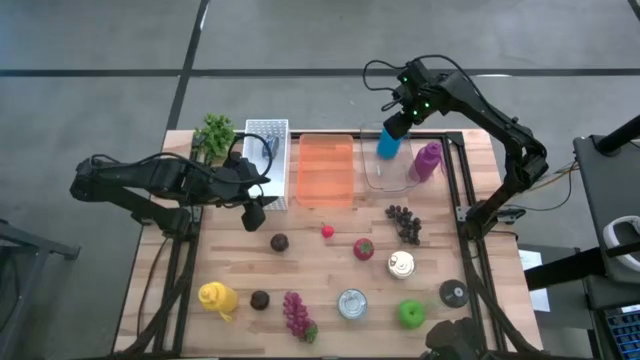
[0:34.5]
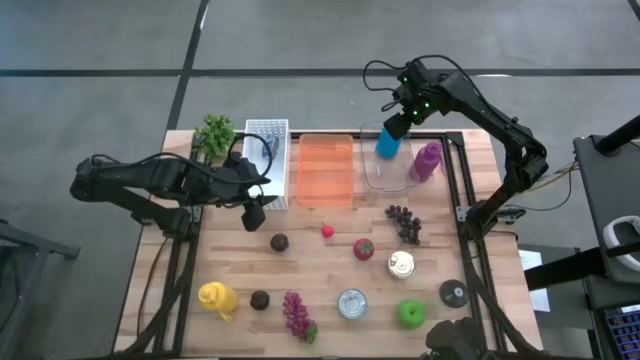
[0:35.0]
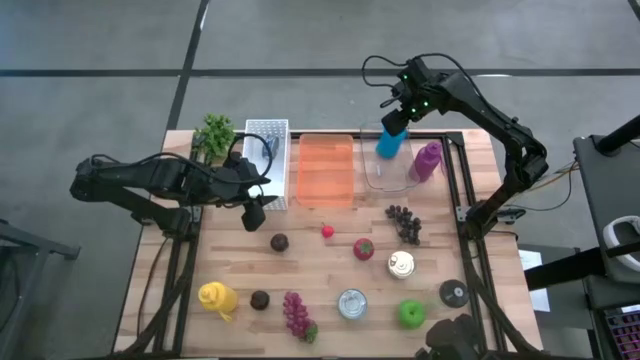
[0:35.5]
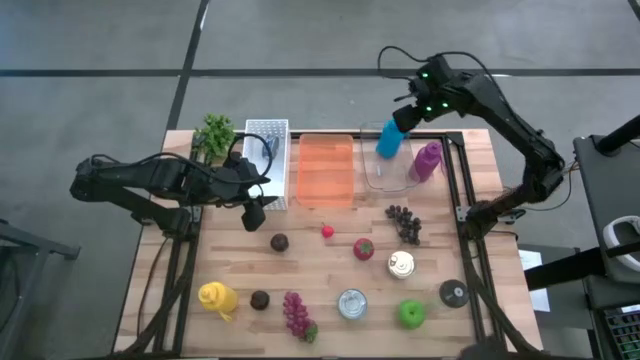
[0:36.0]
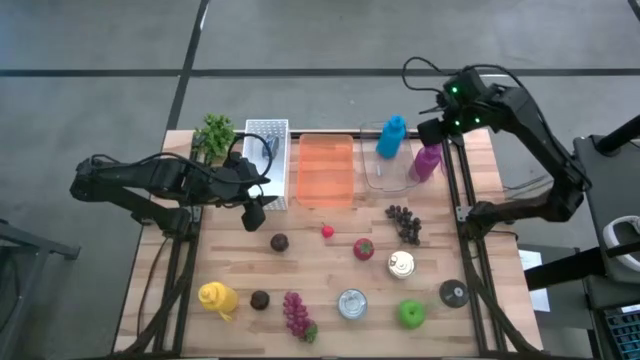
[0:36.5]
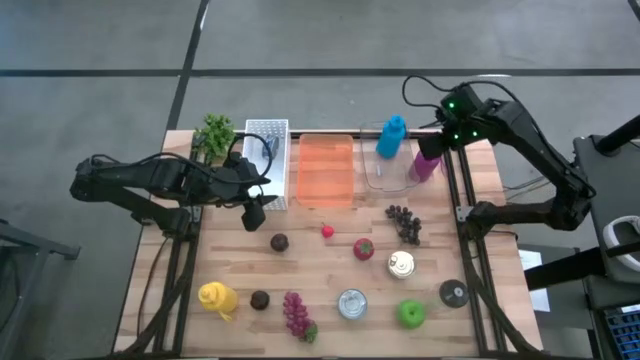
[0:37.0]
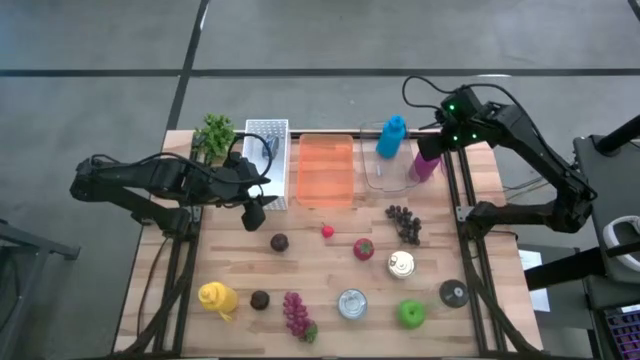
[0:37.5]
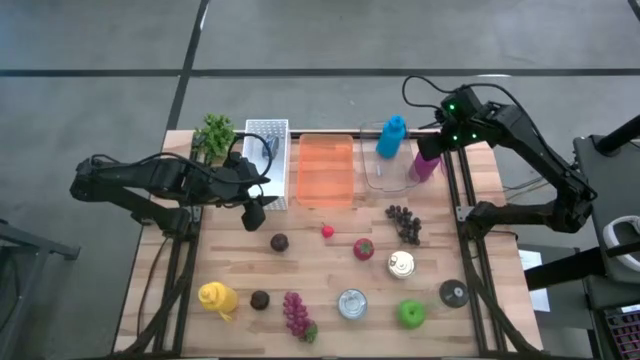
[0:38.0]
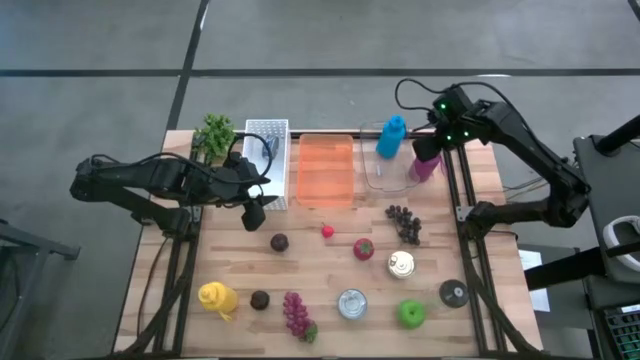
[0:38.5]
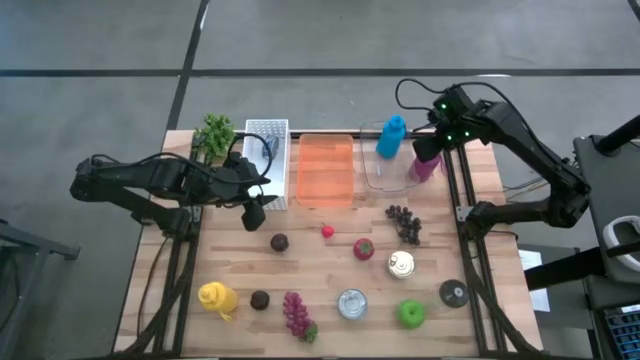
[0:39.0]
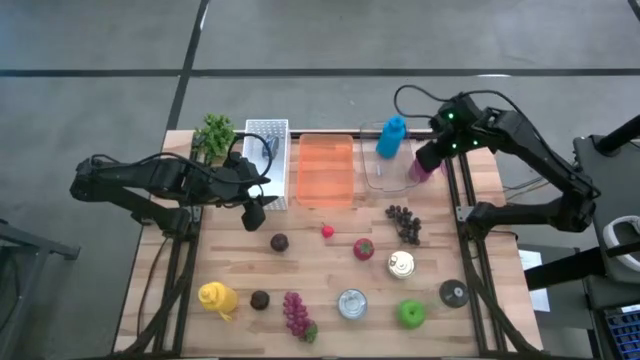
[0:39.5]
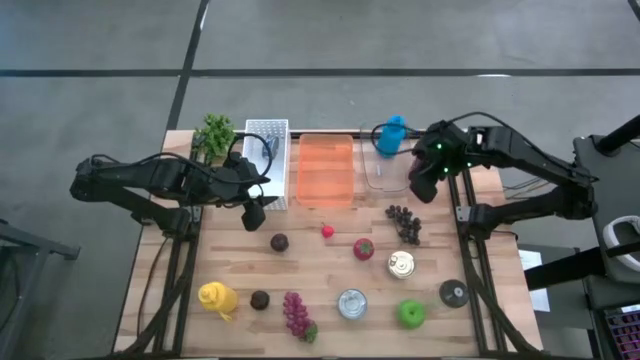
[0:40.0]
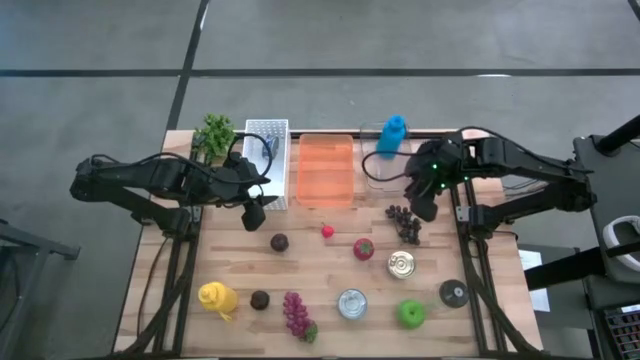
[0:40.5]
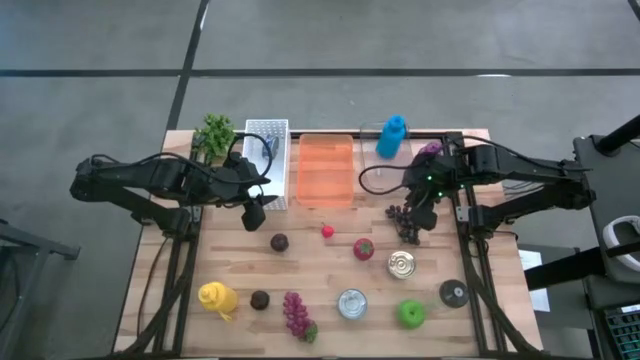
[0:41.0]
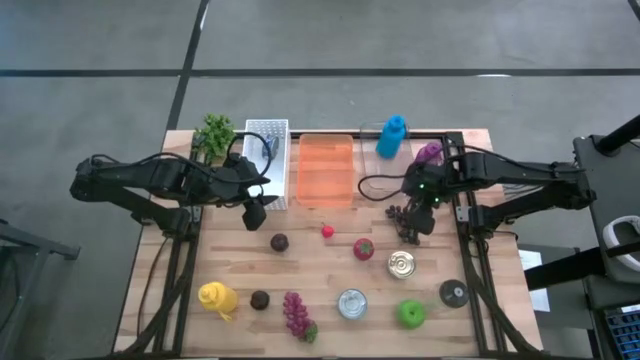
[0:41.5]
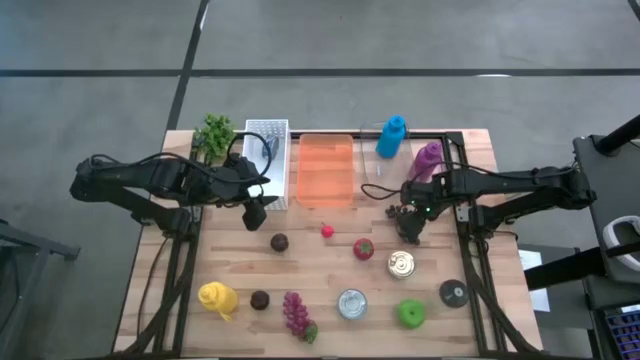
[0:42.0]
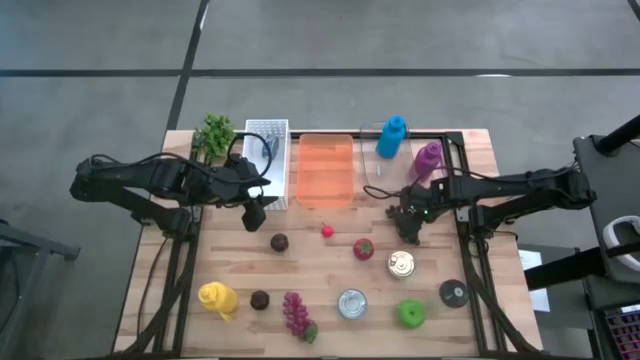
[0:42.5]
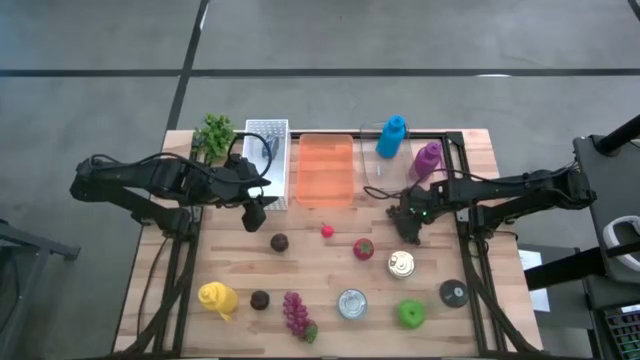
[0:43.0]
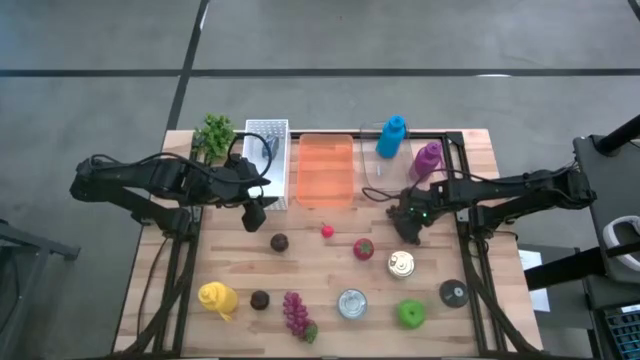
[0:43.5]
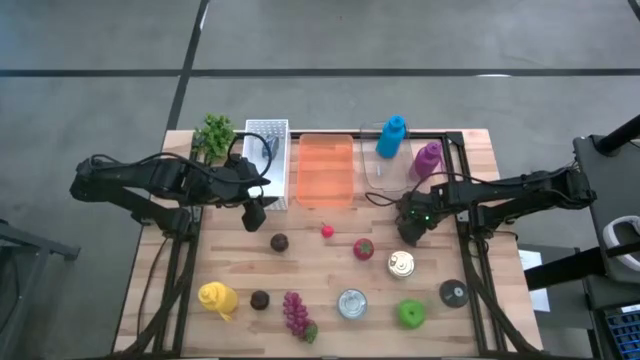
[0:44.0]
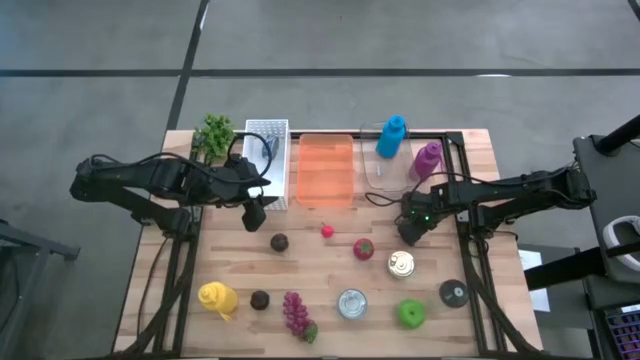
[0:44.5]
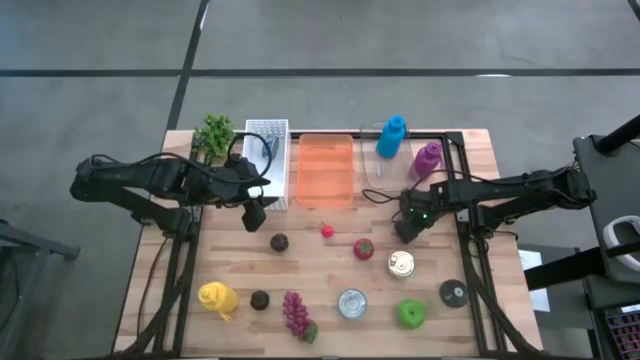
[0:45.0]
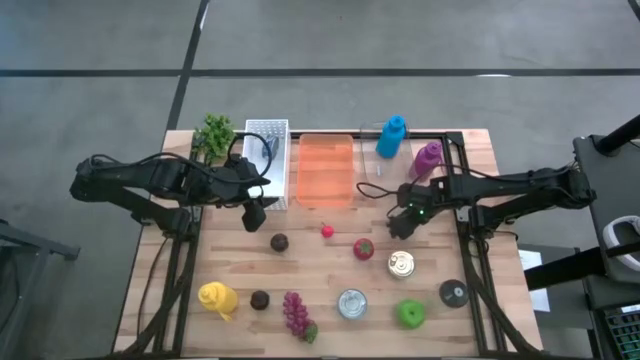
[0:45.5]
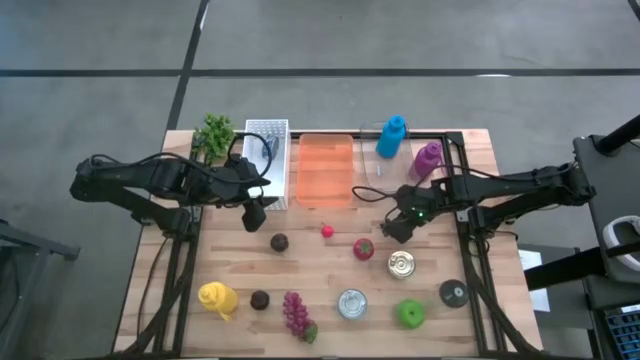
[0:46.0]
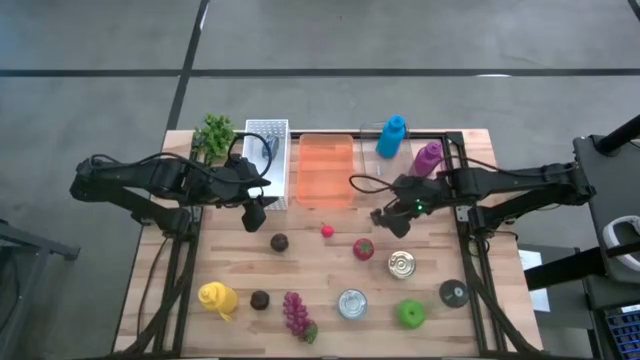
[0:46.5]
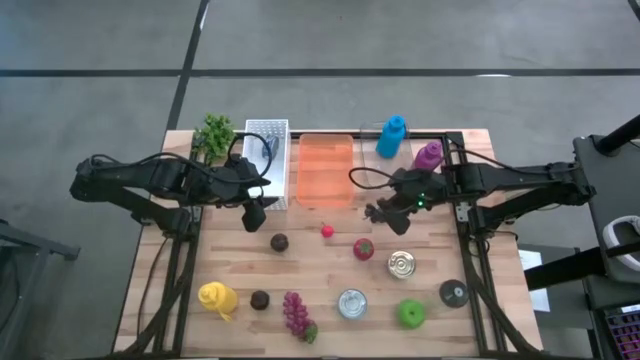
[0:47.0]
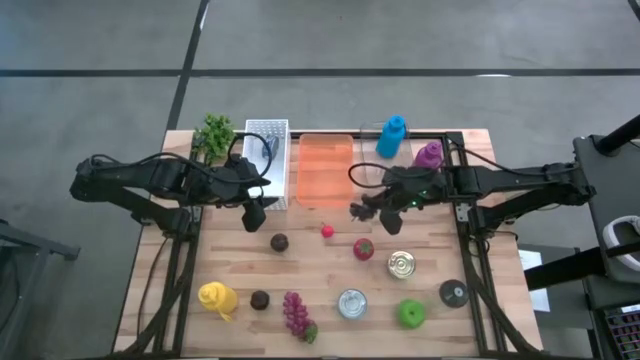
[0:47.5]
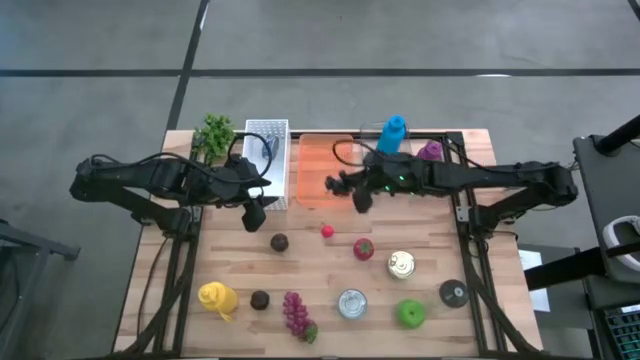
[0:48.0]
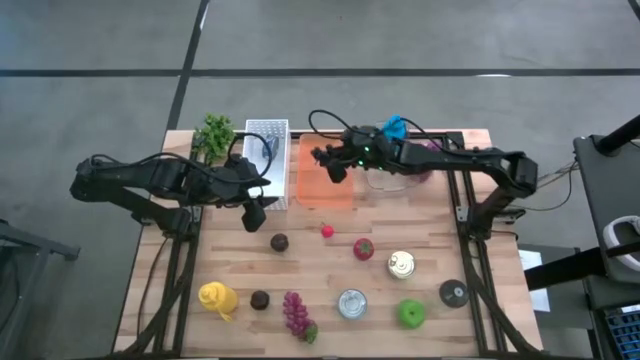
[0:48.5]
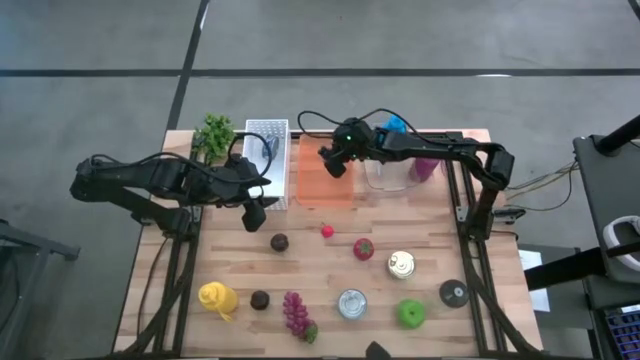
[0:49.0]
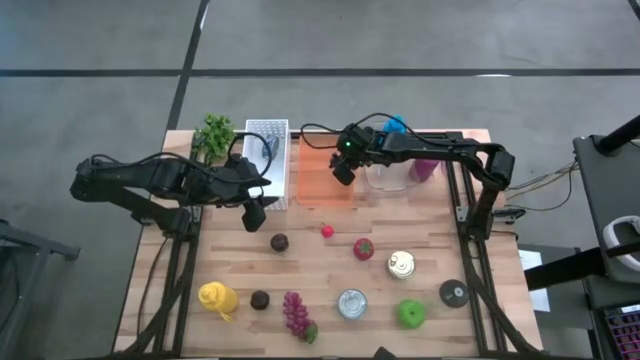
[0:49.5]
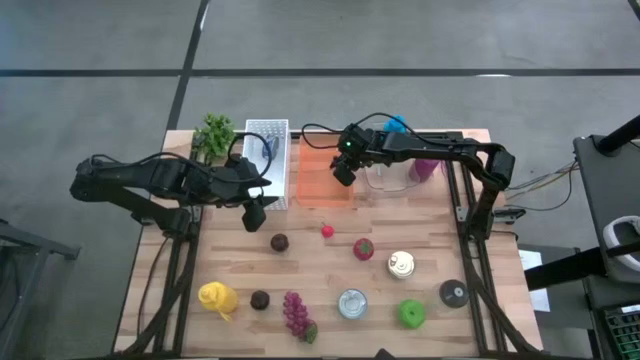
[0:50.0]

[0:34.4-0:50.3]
Task: Pick & Place Food Item
Put the top grapes into the orange bin

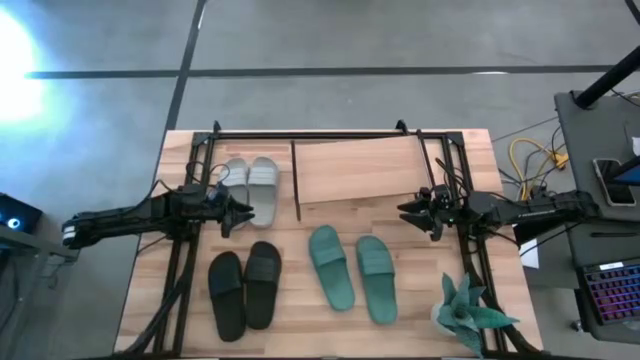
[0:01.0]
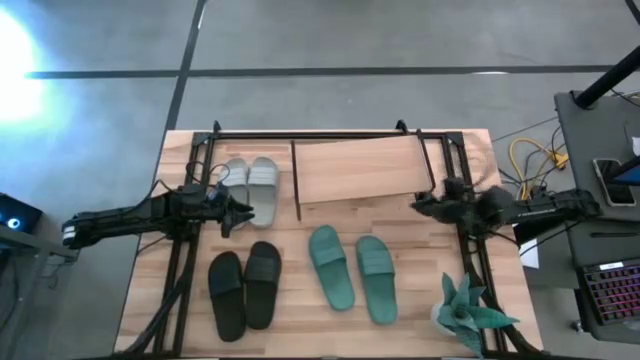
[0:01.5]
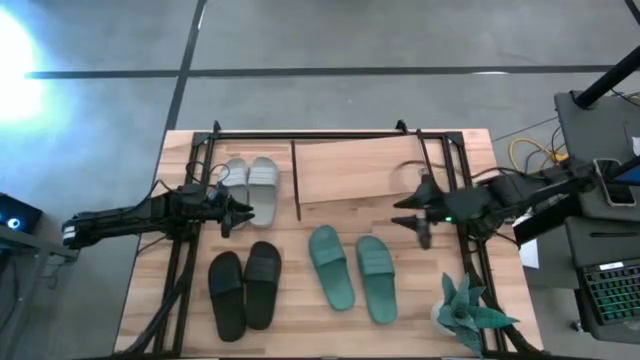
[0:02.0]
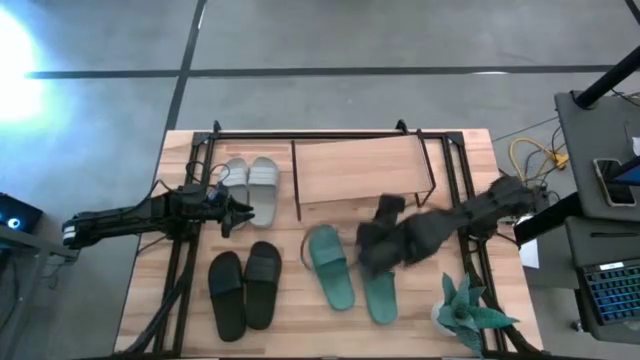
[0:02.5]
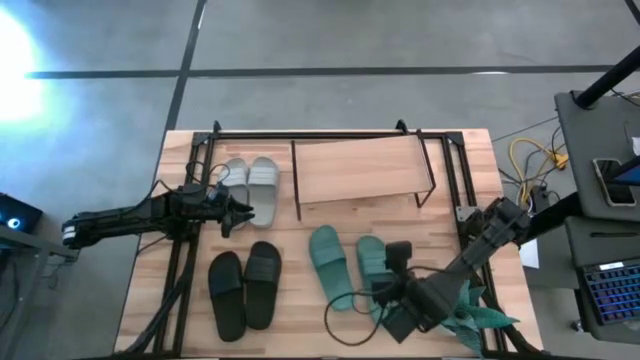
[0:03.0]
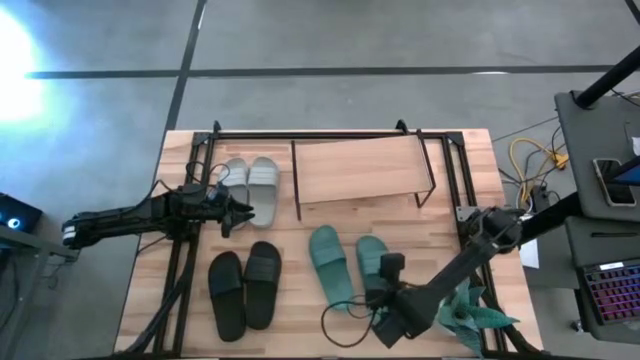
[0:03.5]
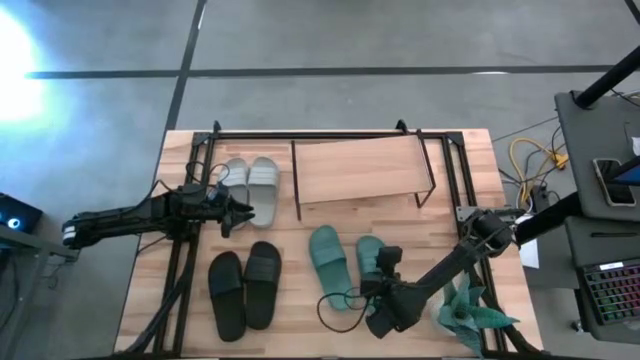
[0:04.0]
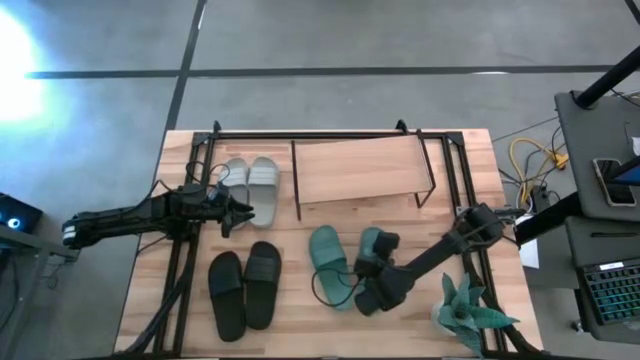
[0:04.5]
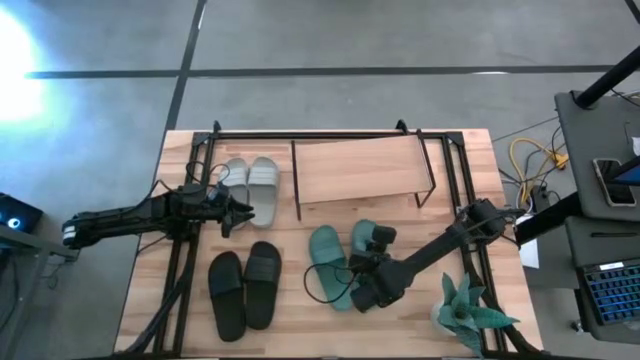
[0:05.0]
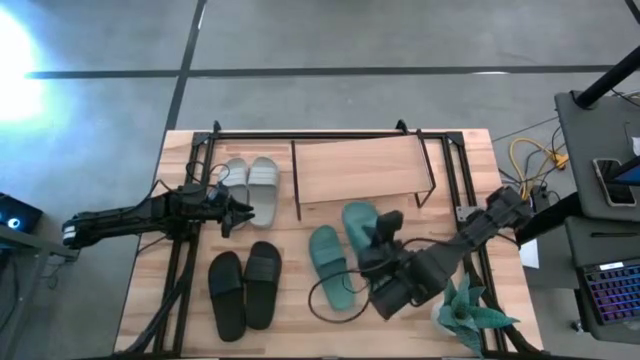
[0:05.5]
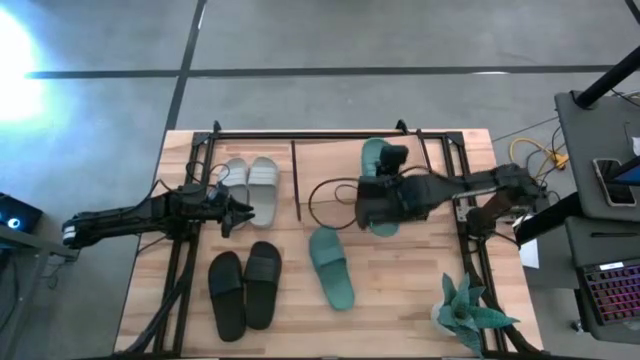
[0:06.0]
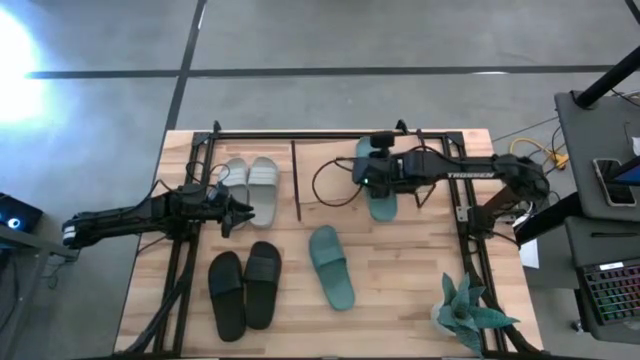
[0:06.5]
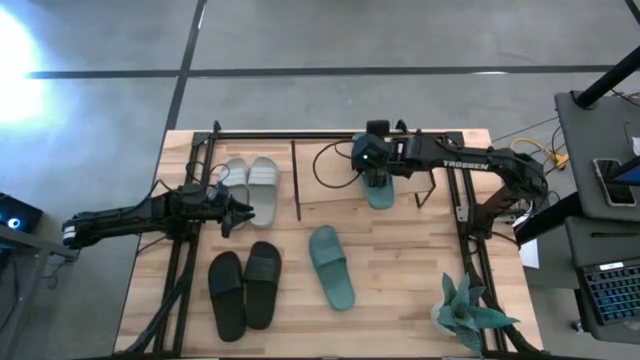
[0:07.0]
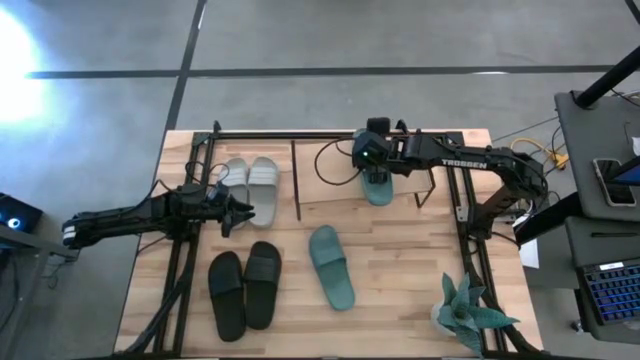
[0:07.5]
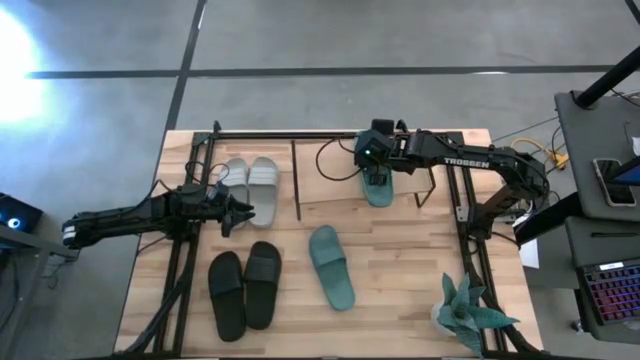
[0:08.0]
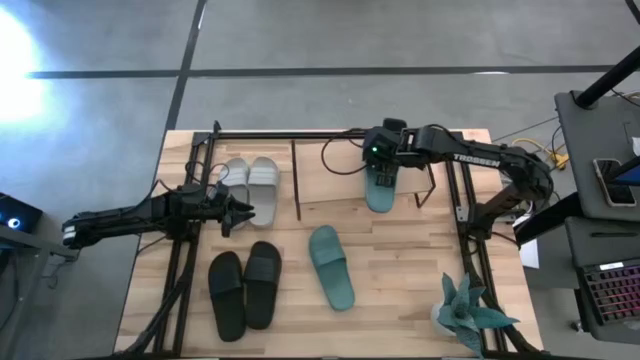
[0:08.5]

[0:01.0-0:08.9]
Task: Pick and place slides into the shelf
Put the right green slide on the shelf
